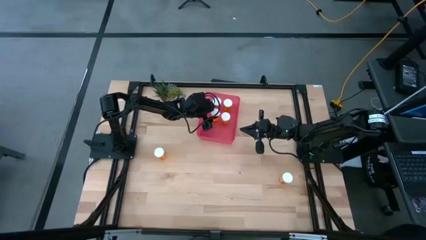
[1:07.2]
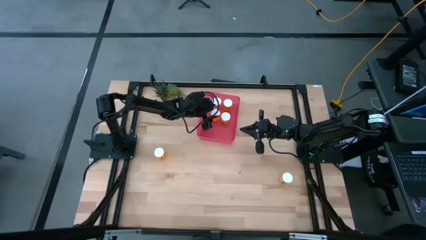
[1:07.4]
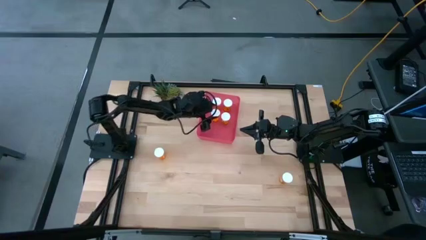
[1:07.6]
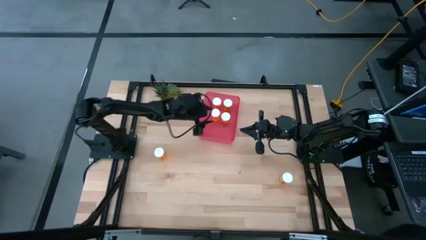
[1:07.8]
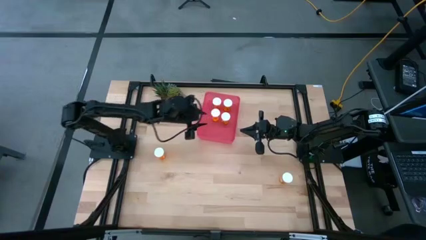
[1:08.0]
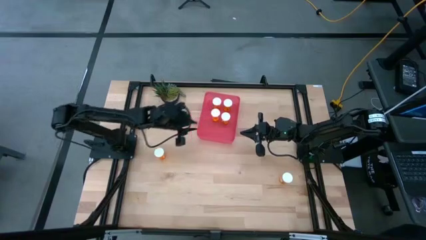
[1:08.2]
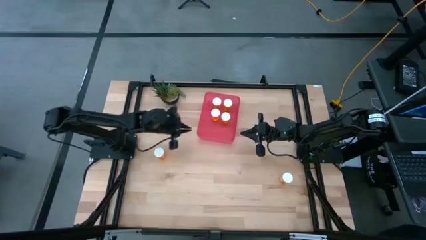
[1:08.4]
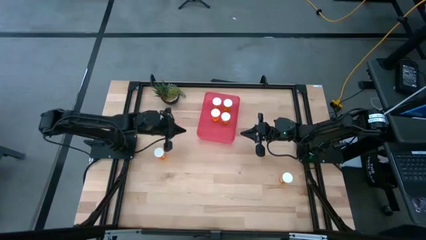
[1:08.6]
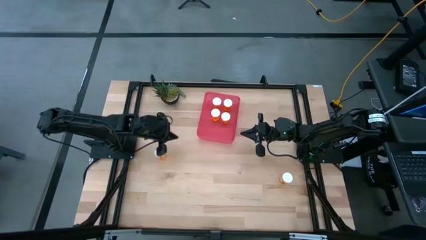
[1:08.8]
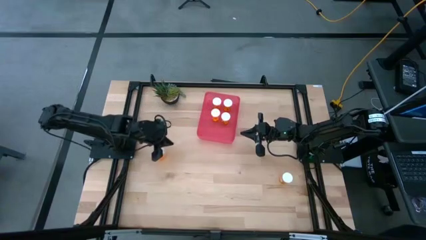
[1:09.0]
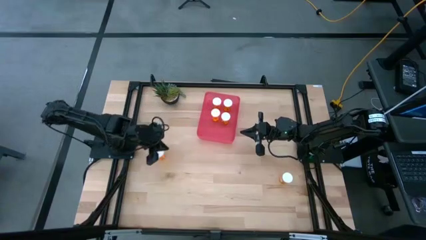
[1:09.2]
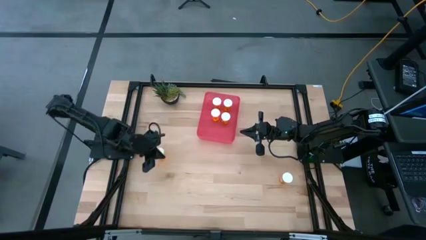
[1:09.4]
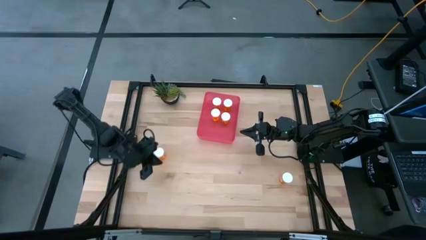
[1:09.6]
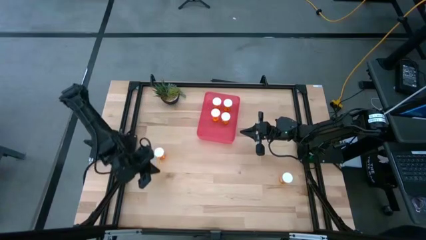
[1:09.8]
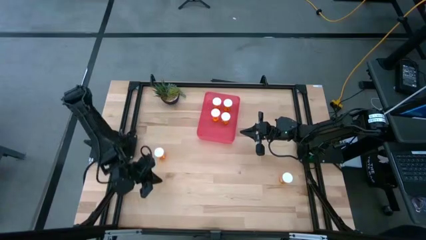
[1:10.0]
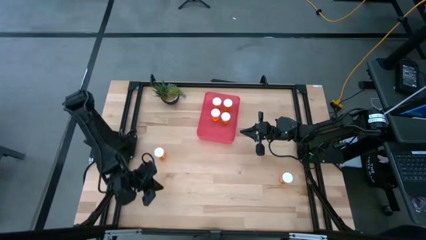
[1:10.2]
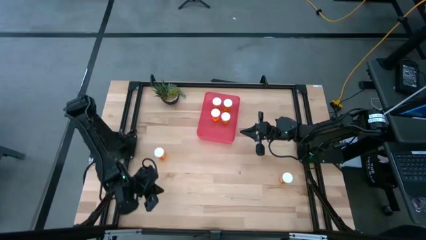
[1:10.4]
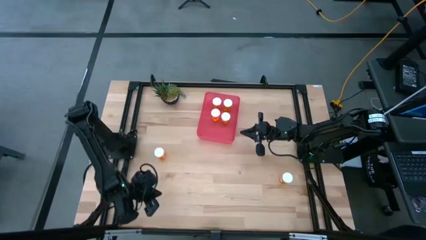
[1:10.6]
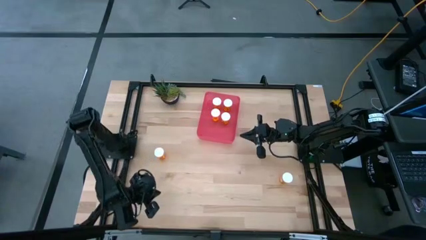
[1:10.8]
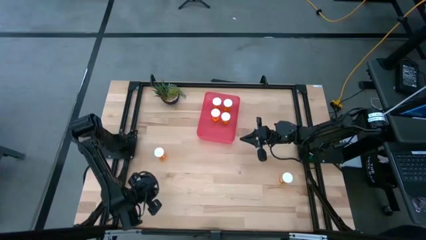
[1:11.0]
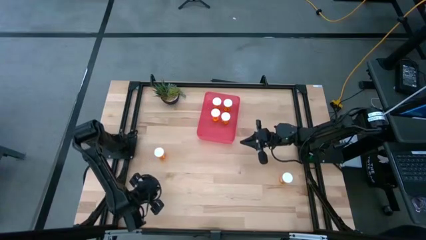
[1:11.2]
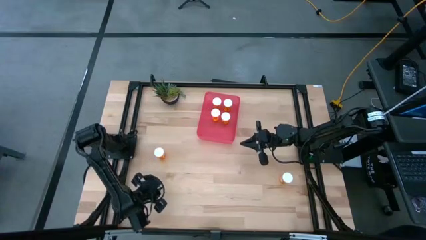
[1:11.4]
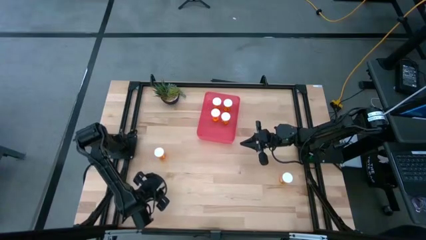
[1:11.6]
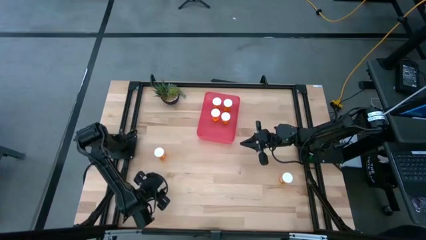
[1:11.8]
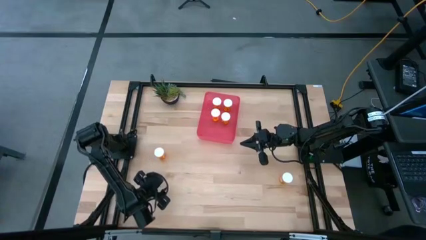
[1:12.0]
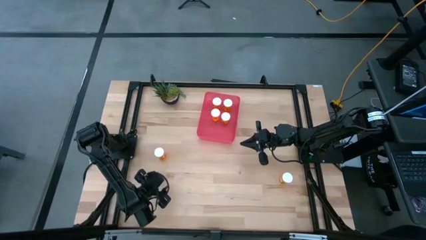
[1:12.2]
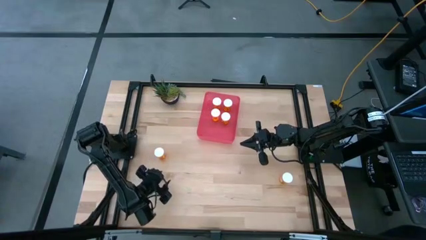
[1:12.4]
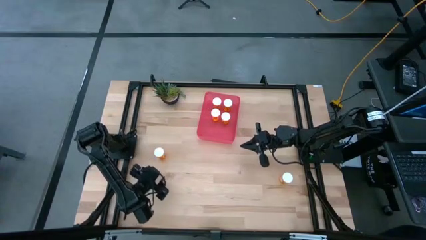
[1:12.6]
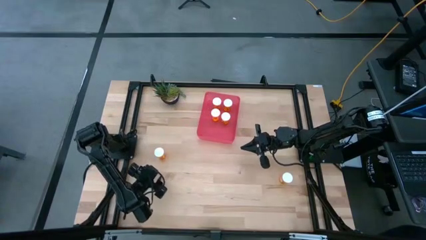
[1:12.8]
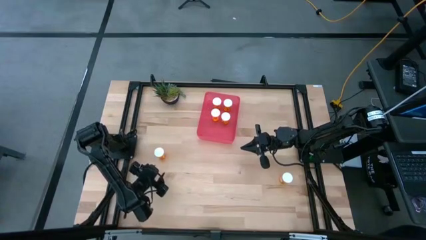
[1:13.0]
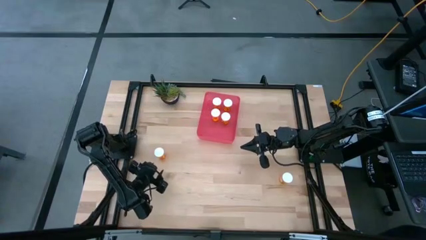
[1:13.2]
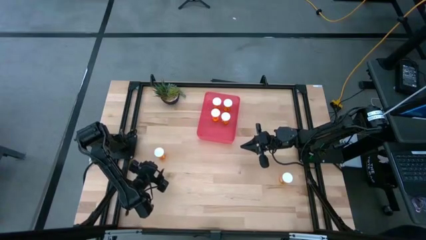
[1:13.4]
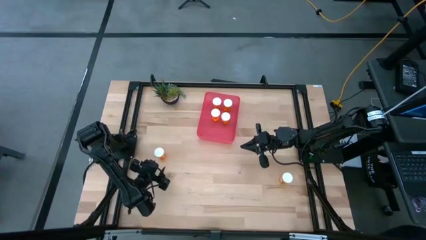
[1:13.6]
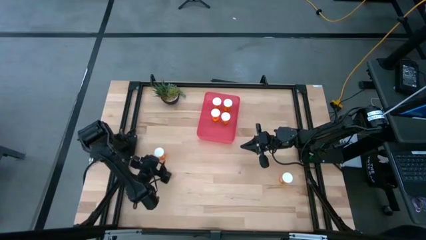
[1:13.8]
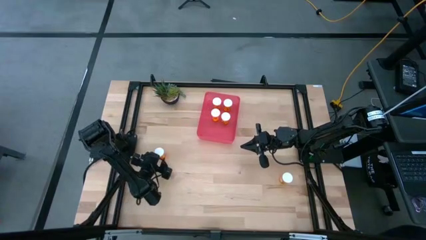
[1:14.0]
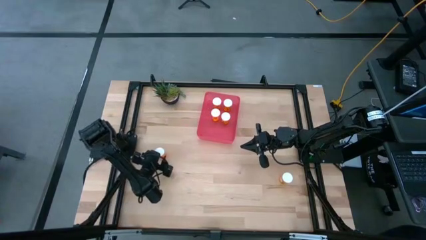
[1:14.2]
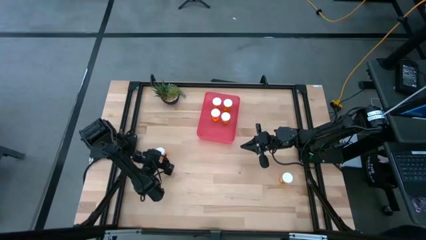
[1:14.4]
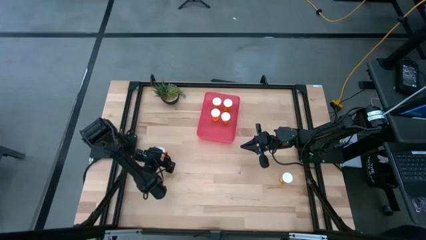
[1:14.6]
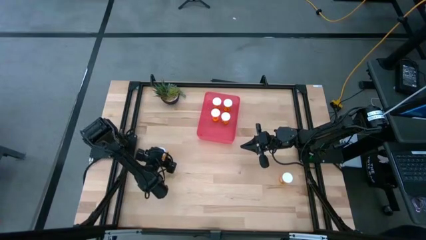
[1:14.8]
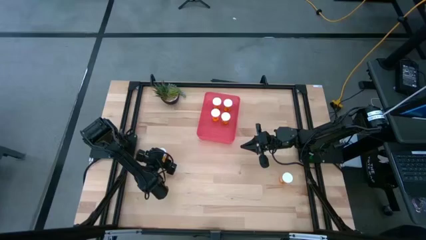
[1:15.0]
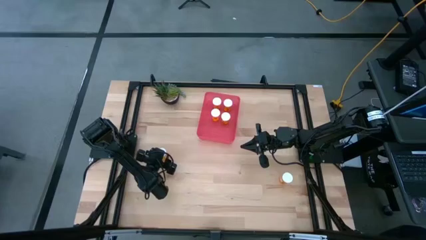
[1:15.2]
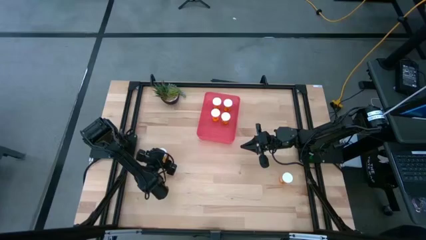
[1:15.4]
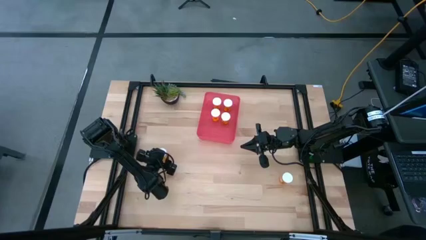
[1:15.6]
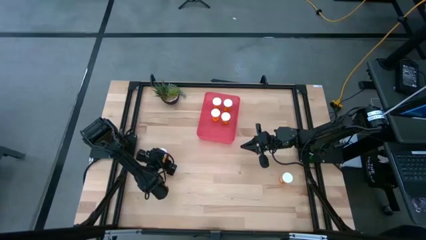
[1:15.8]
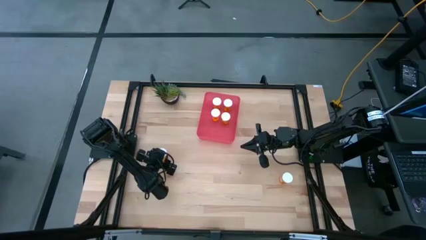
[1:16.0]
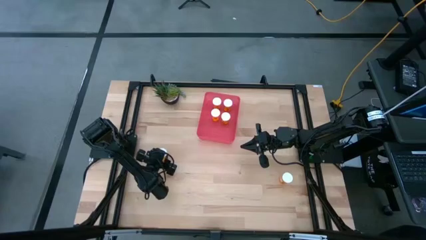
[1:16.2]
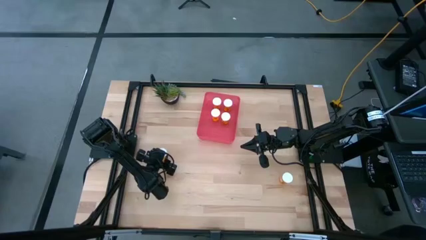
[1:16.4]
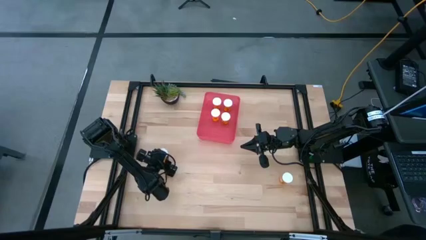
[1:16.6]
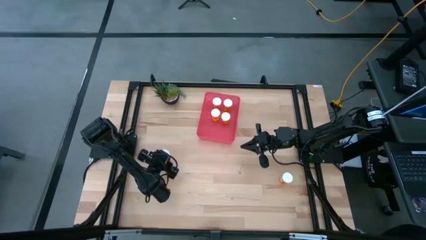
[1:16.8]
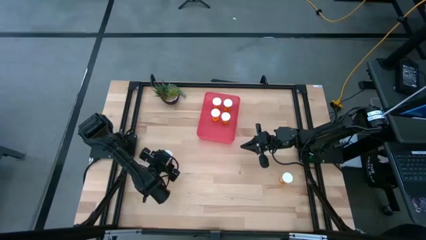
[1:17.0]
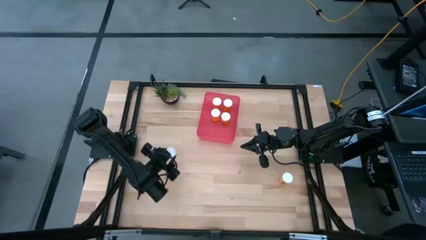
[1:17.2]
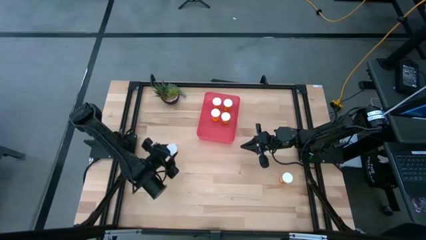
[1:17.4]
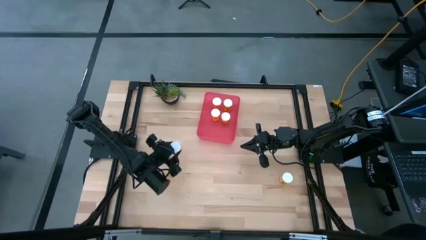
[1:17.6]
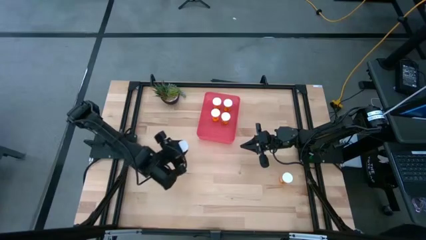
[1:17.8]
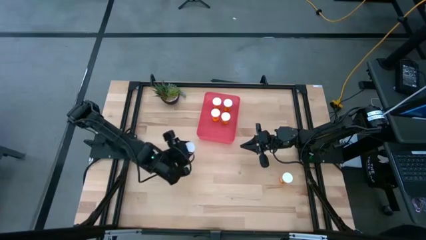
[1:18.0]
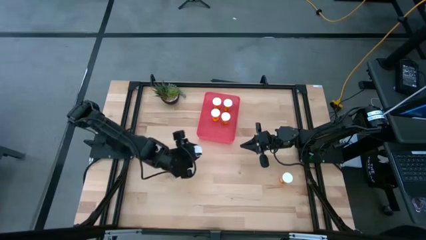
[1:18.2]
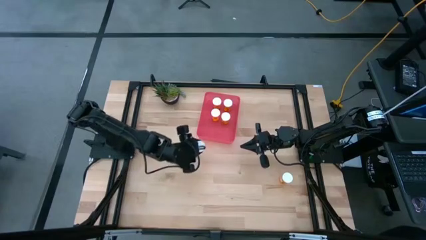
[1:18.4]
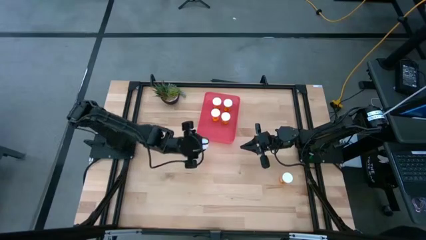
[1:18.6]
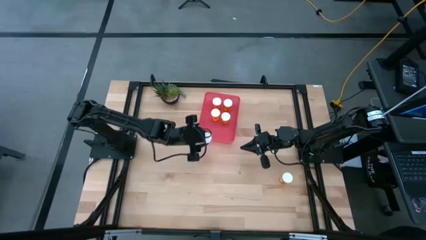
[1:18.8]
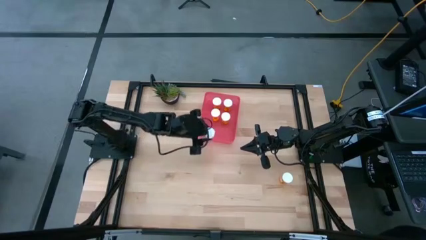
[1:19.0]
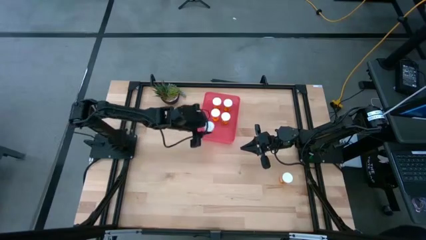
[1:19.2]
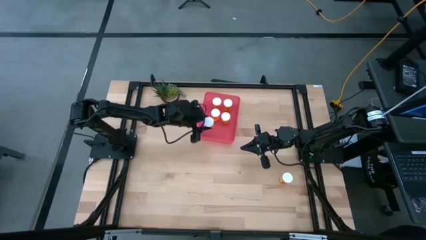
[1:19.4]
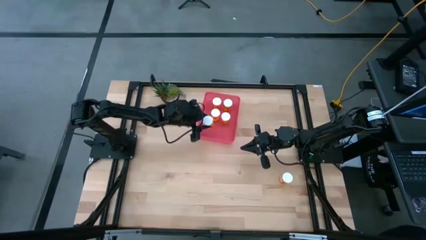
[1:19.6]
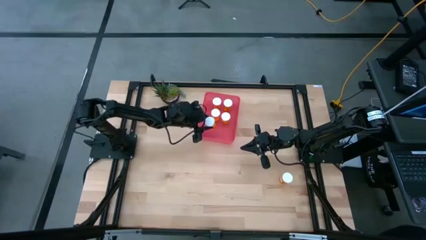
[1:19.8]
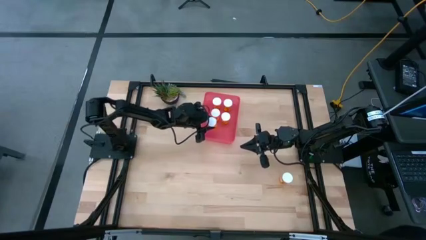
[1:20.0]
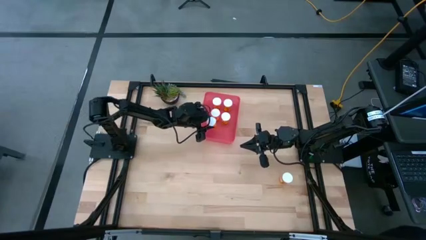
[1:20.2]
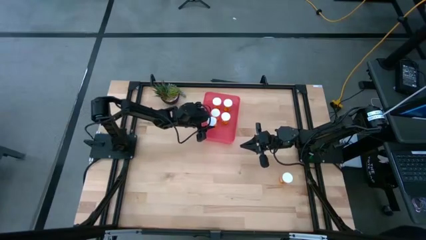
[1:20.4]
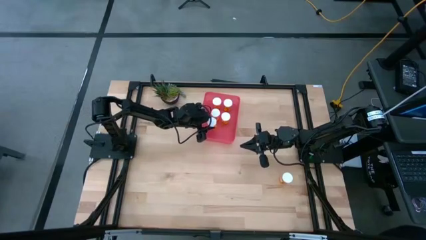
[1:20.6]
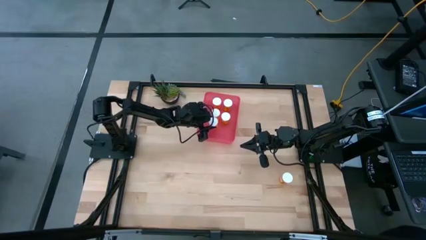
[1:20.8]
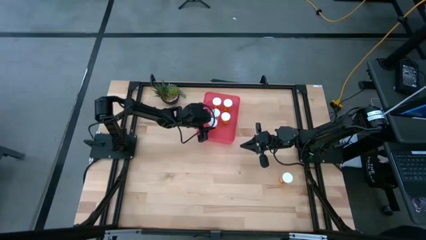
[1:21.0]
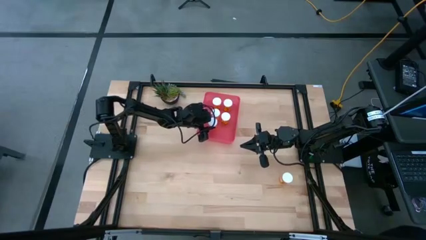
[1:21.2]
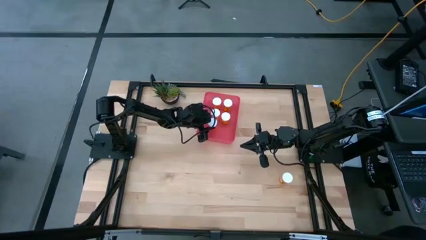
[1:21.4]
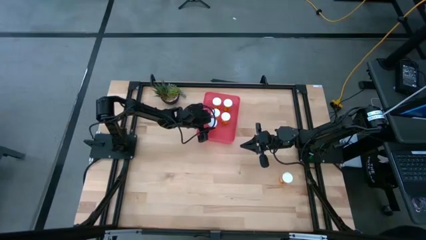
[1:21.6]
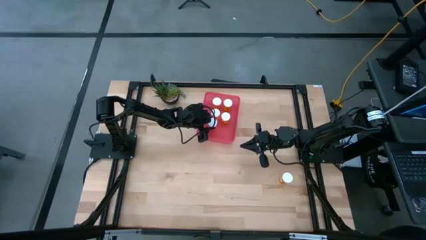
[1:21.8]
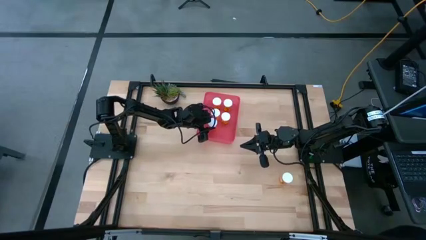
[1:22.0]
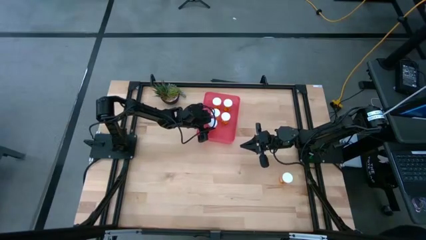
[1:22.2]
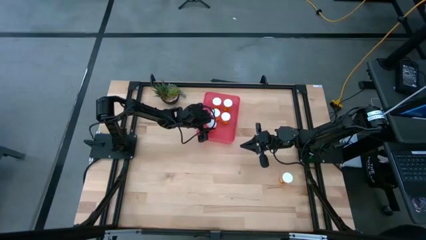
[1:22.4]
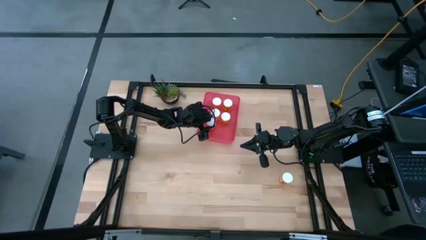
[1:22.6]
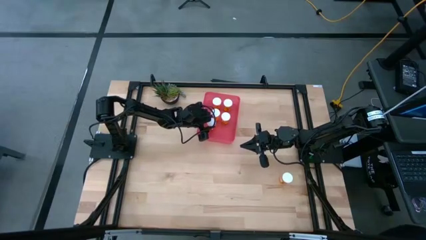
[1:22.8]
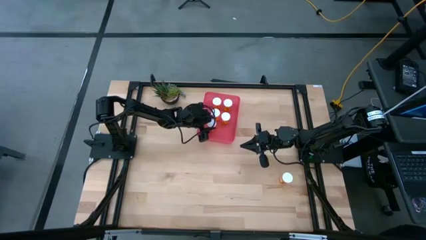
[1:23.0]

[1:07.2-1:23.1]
Task: Pick and place pill bottles into a basket
Put the orange pill bottle into the red bin

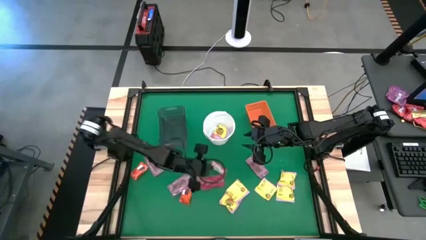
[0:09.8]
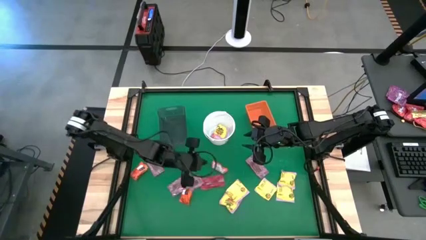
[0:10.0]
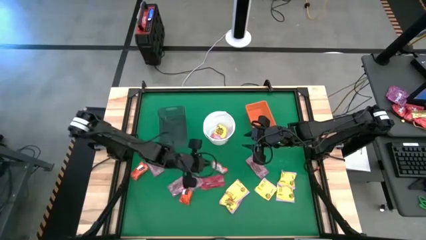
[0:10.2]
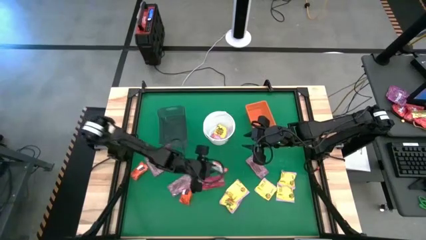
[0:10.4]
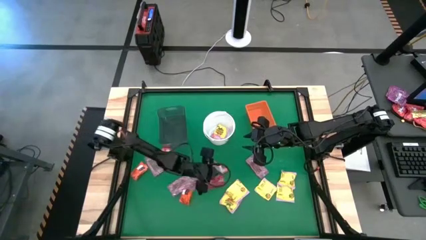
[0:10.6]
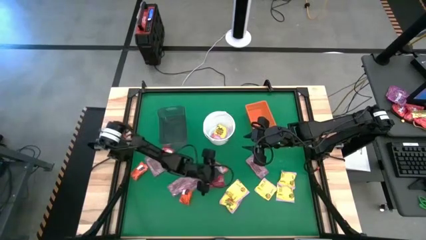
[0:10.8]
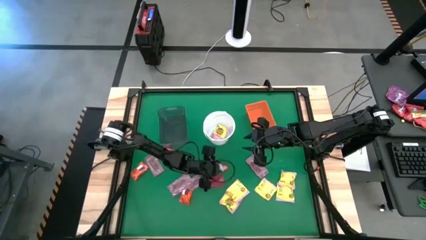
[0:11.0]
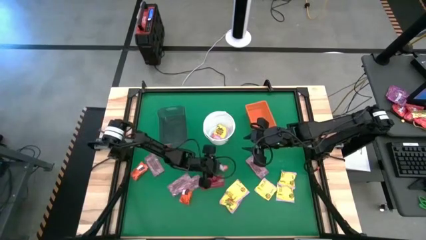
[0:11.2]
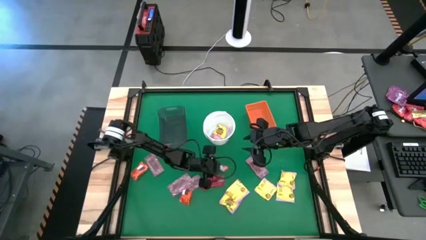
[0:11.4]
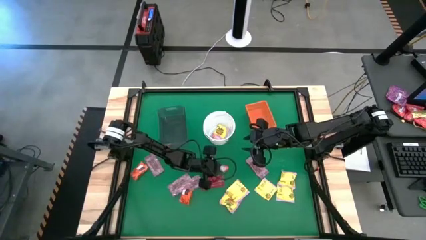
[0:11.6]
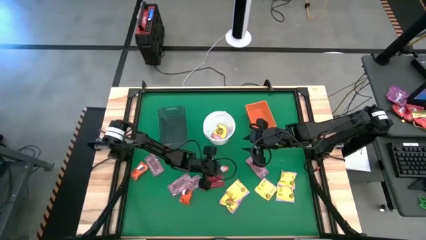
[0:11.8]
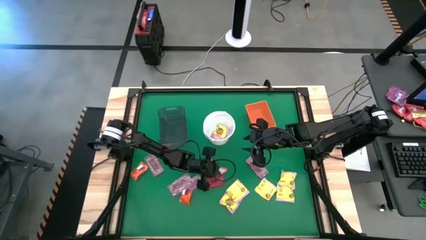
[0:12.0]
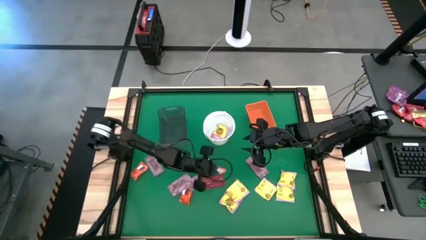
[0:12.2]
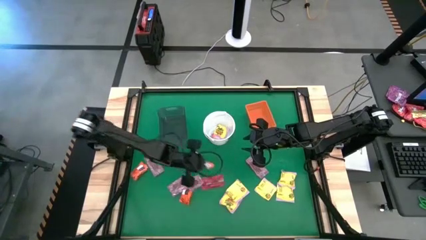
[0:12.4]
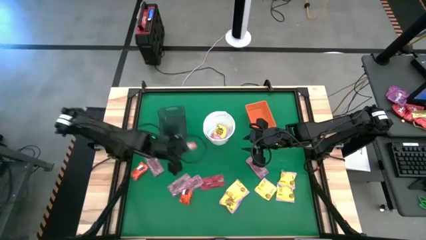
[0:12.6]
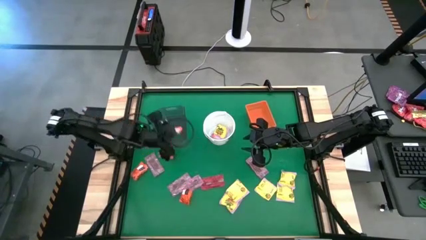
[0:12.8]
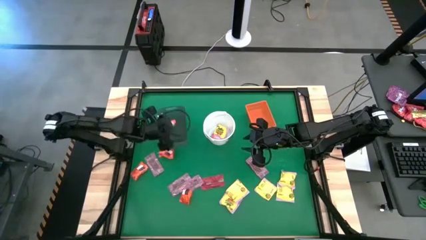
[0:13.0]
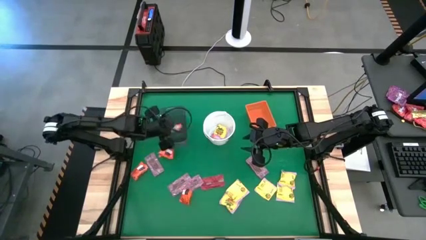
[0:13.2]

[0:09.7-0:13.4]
Task: Sort candy by brand, put in halloween buckets
Put the orange chocolate into the black bin
